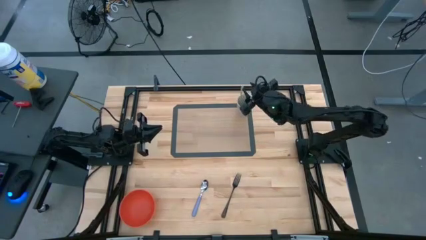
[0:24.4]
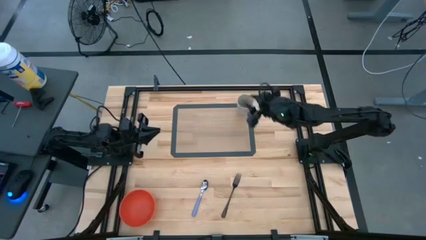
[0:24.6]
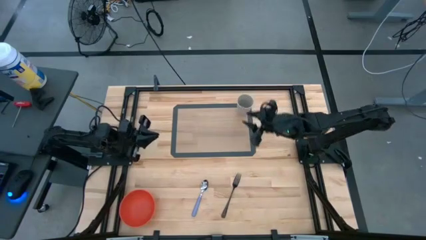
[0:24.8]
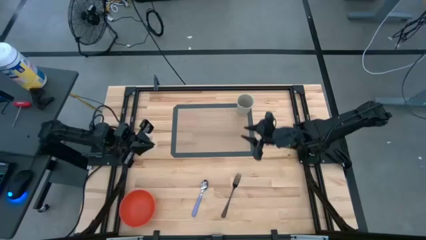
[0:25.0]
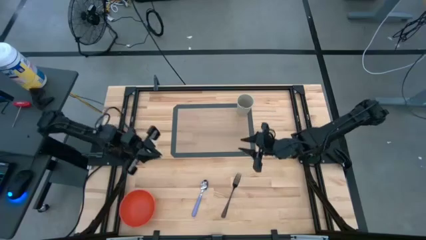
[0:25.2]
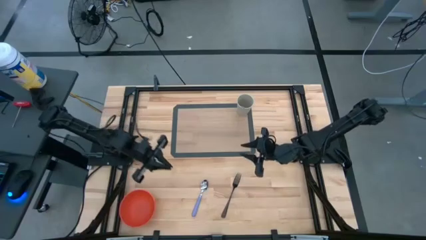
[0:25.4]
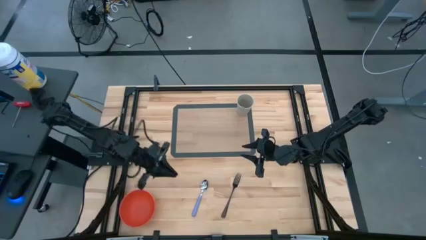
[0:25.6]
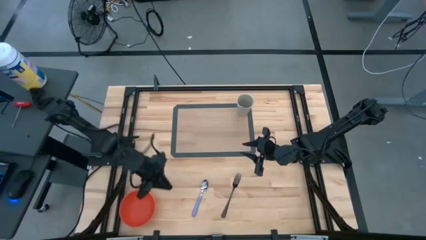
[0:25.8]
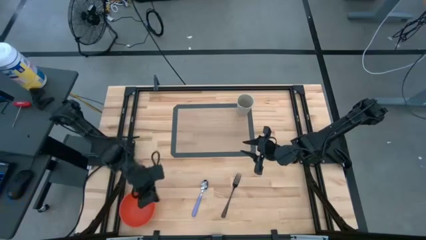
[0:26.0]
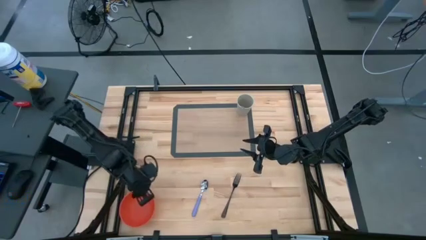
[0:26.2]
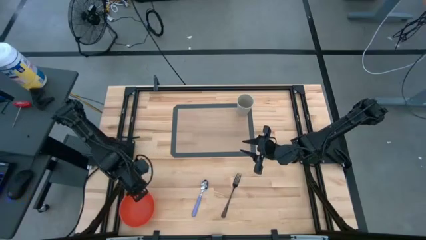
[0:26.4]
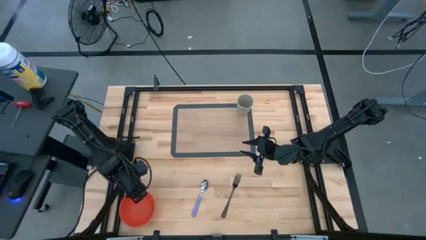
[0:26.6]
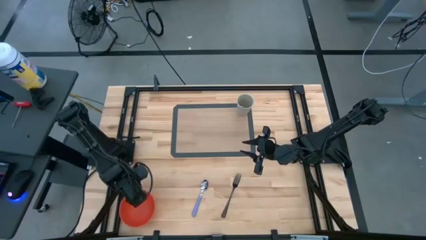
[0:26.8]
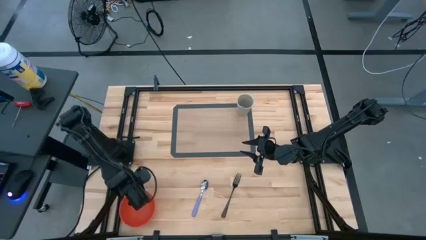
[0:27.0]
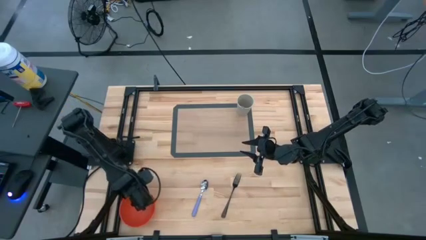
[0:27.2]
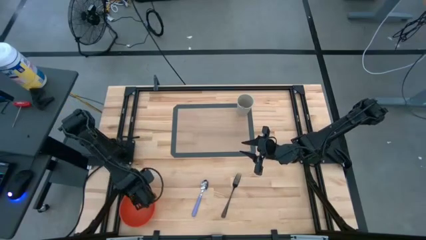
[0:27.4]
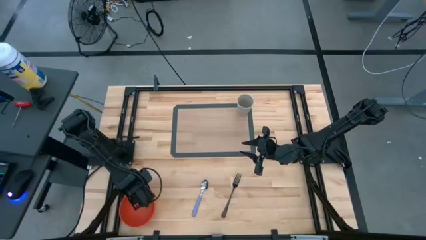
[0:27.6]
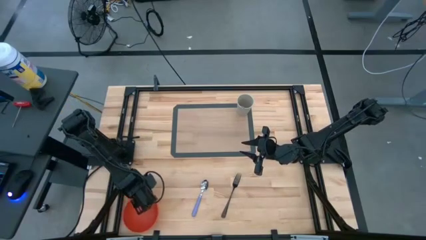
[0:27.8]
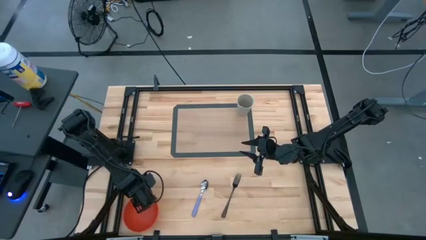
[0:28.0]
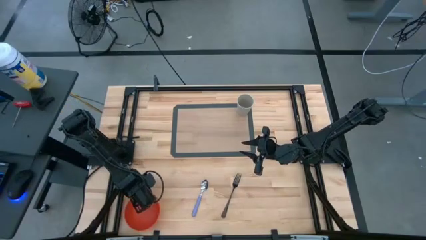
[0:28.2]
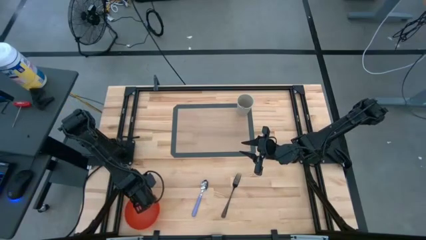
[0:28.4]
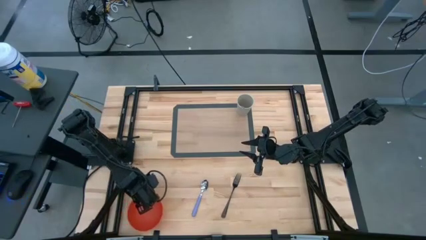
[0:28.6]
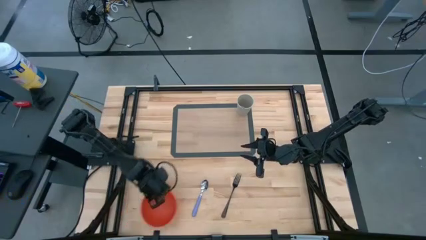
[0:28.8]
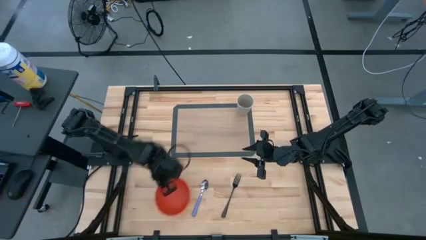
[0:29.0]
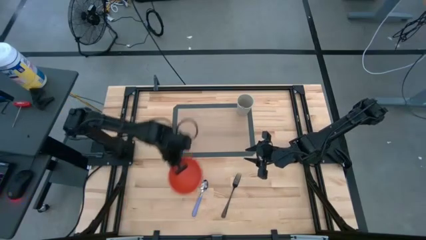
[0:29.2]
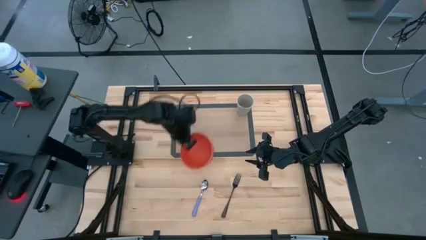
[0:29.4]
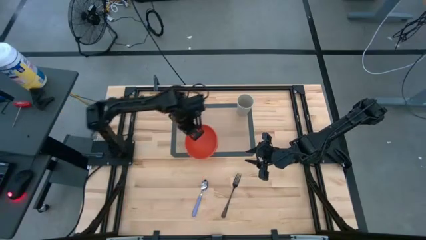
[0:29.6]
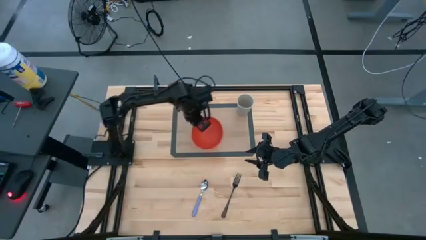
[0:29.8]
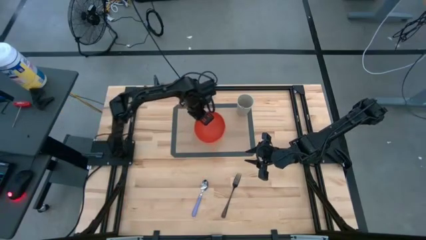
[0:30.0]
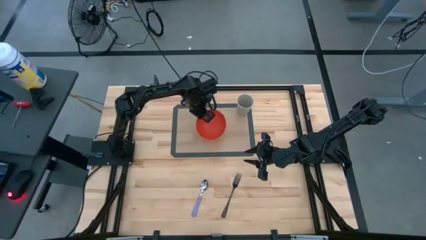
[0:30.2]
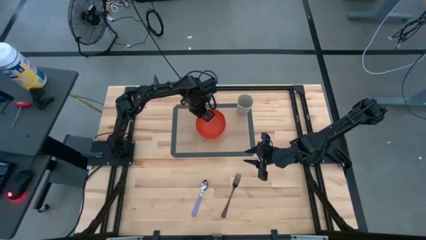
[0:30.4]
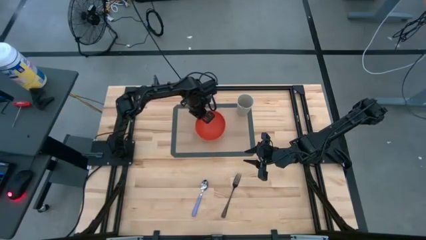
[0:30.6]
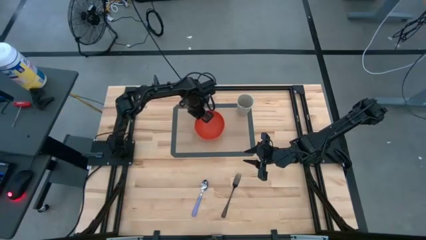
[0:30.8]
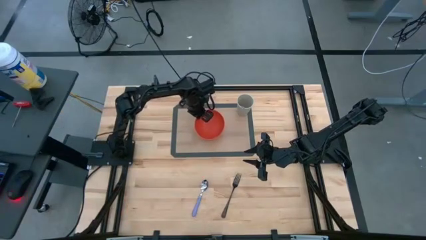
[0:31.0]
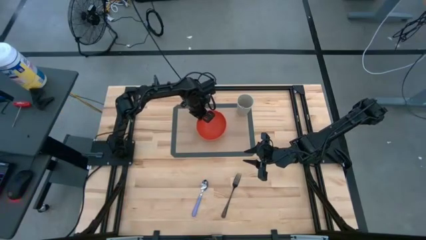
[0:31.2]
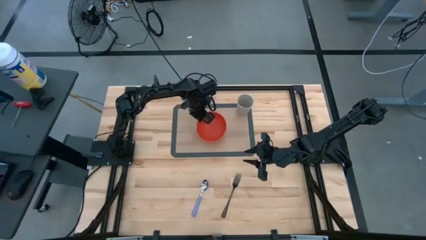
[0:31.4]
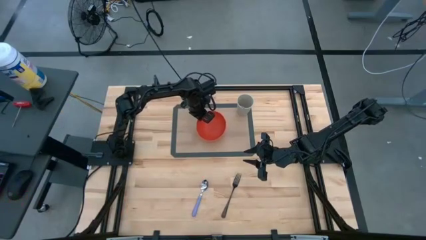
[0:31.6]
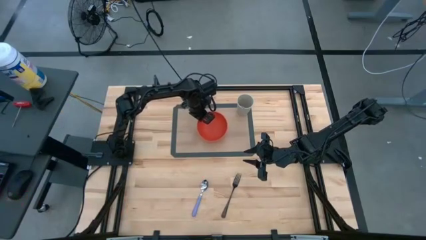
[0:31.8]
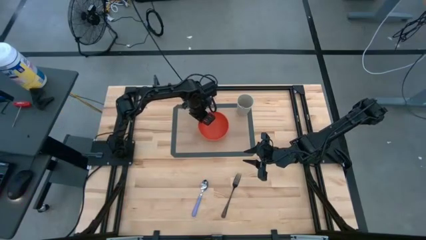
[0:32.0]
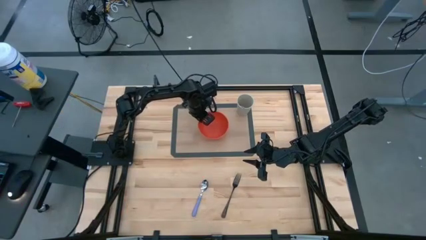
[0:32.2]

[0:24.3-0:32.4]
Task: Pick & Place Utensil
Put the orange bowl on the bottom left of the white cup

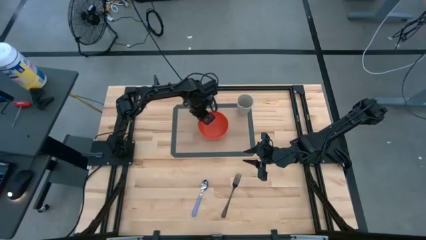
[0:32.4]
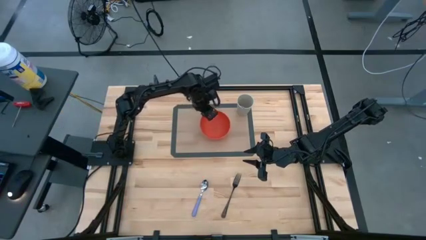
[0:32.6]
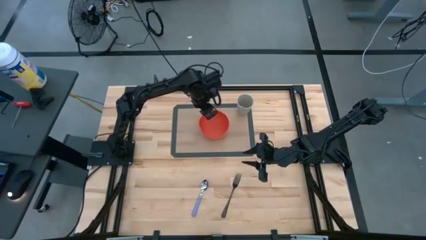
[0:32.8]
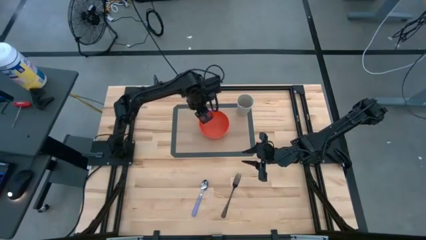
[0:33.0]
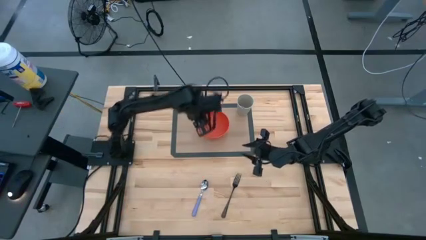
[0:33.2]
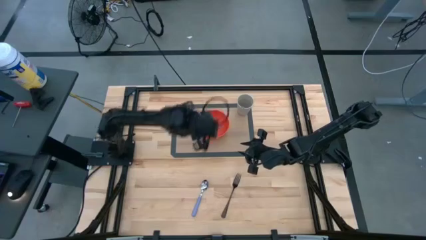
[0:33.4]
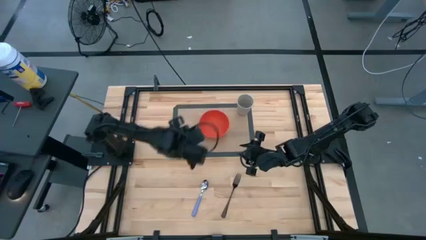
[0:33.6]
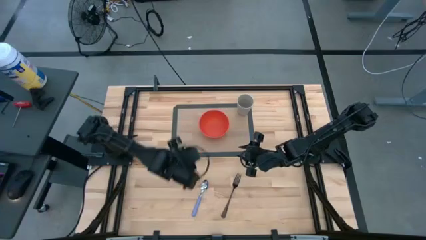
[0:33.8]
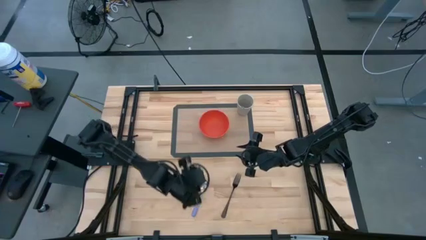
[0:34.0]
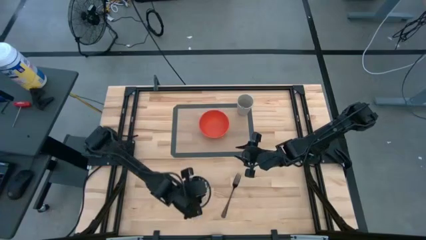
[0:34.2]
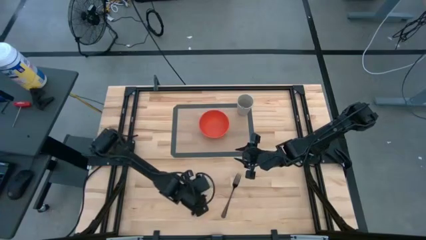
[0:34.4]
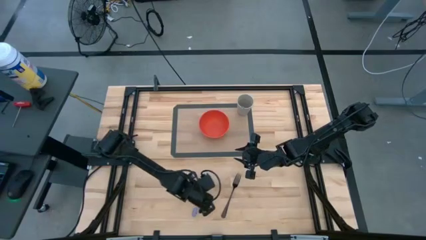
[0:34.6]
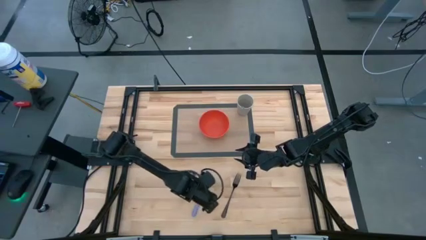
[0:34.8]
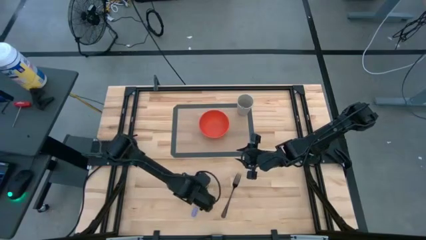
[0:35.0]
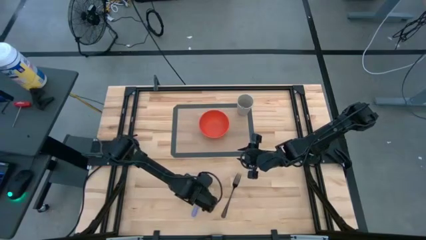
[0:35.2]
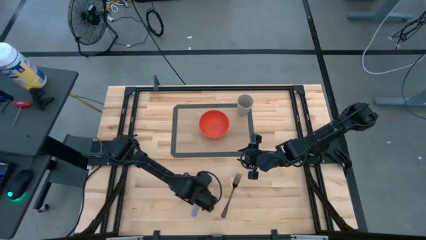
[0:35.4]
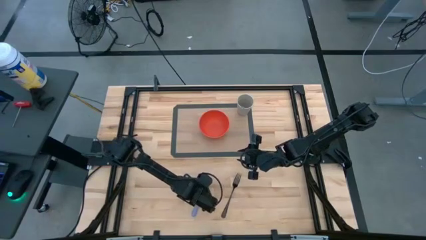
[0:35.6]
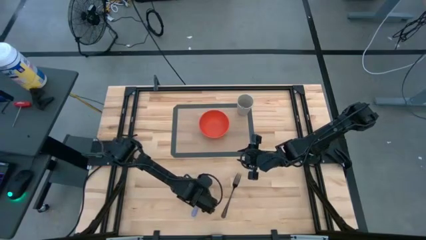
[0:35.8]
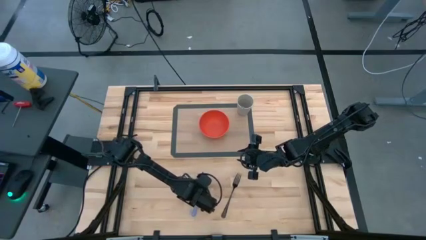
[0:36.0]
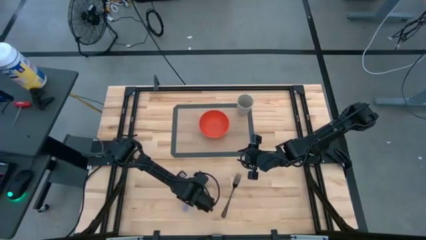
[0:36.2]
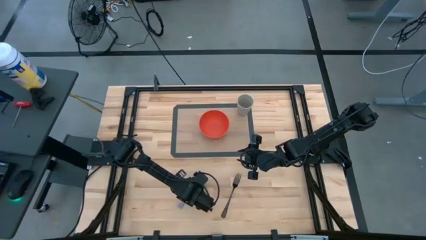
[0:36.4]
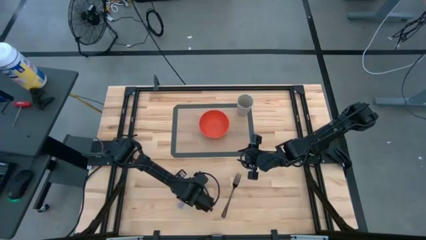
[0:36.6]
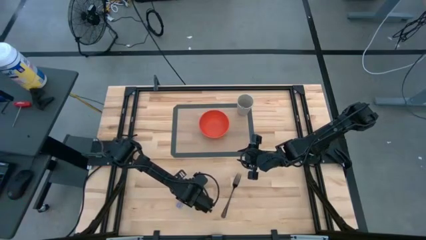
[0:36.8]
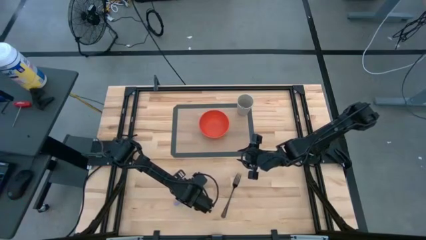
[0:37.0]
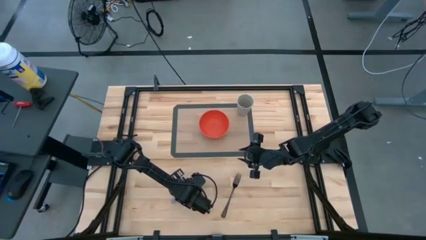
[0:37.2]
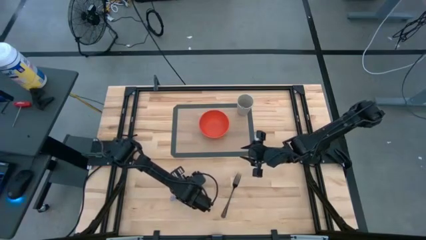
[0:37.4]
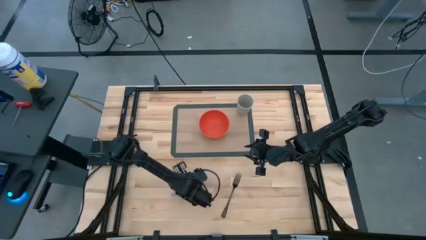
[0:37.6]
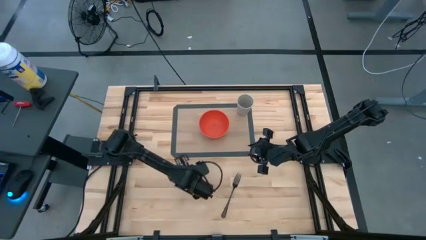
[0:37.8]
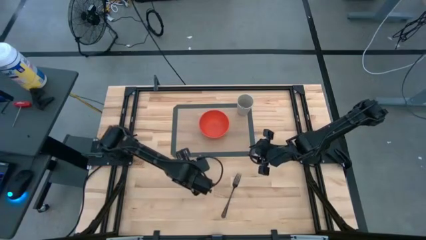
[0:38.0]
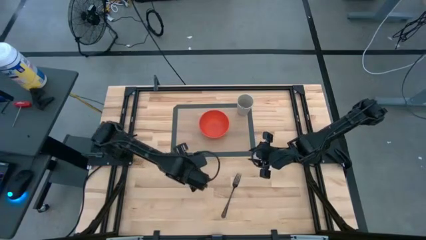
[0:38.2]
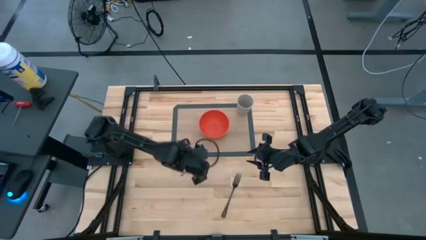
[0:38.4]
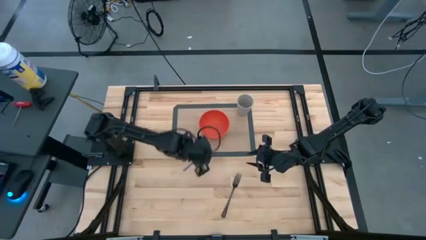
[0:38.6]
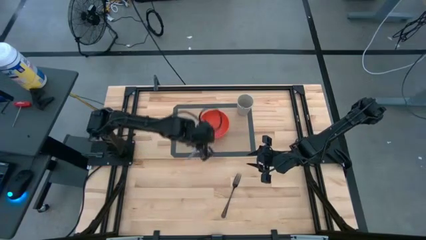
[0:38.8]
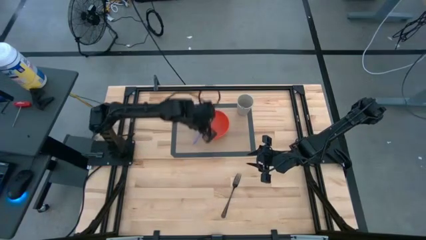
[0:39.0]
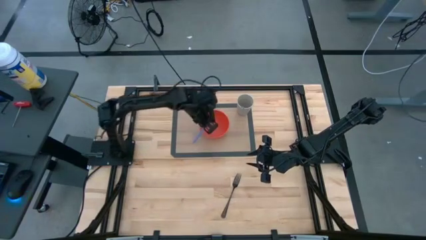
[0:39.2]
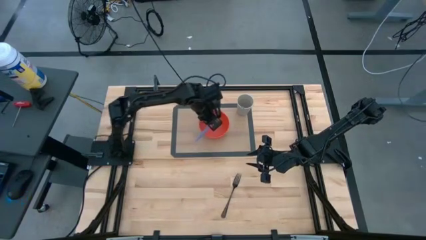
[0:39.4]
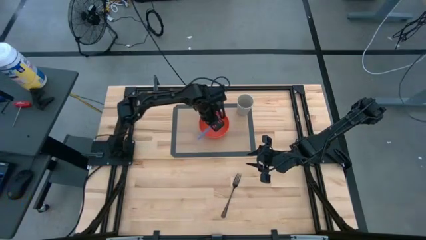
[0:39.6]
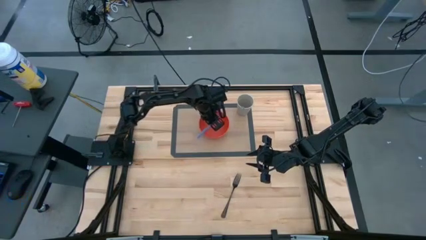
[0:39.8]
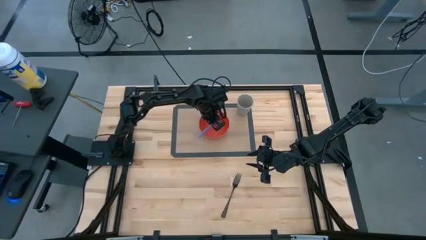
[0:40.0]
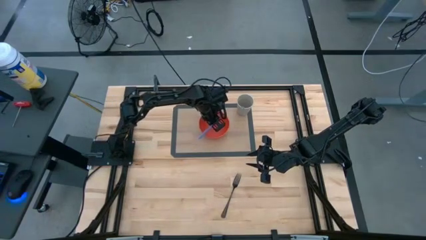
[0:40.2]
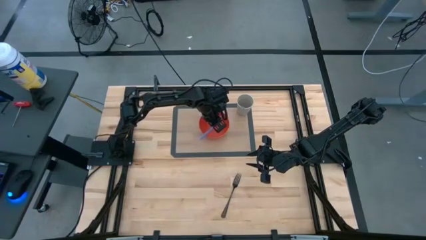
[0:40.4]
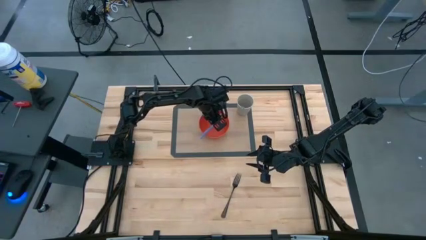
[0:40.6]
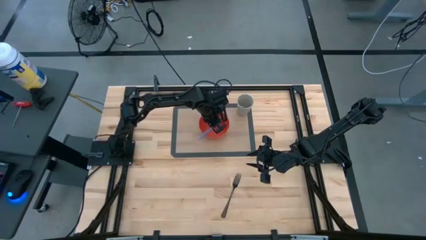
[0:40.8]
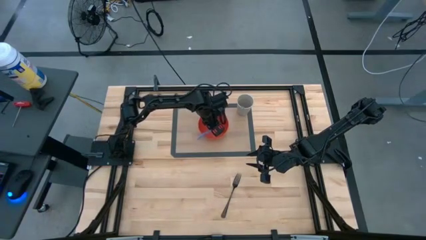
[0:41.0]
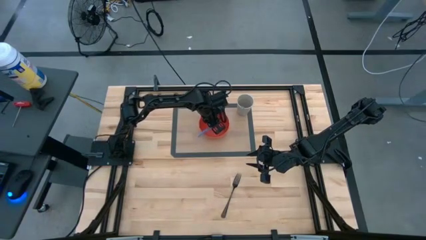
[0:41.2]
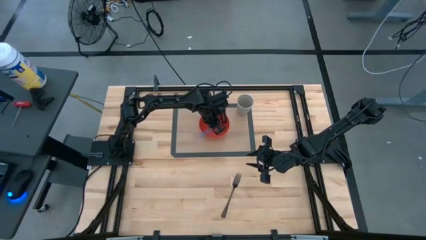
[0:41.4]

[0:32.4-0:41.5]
Put the purple spoon into the orange bowl

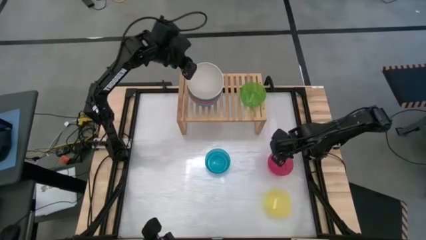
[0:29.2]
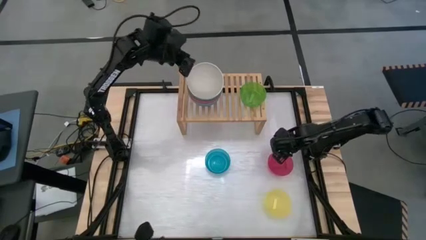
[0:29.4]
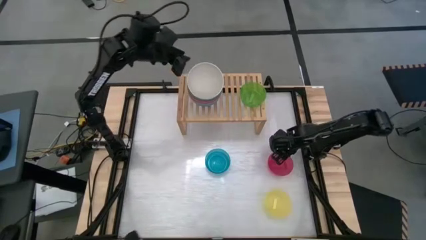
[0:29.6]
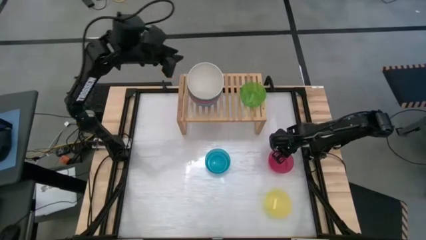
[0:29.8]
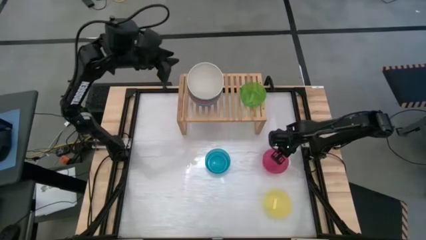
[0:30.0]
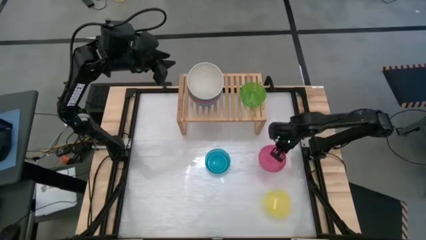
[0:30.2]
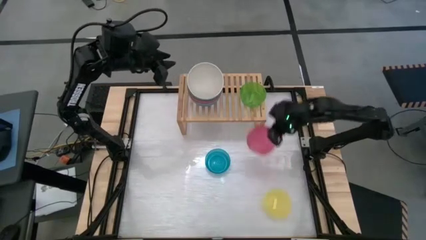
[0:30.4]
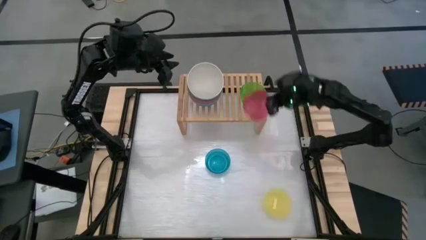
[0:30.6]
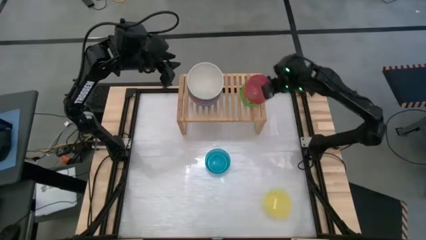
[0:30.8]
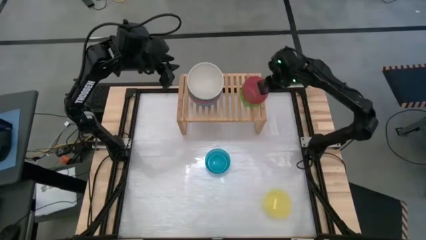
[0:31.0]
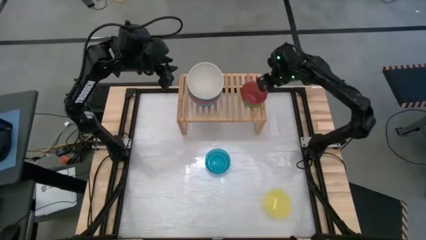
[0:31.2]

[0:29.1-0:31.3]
Task: Place and stack bowls onto a shelf
Stack the pink bowl on top of the green bowl on the shelf
